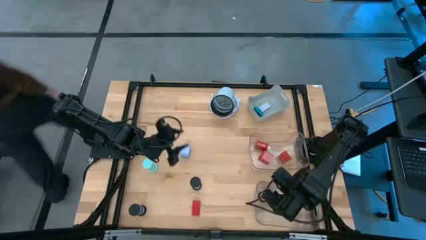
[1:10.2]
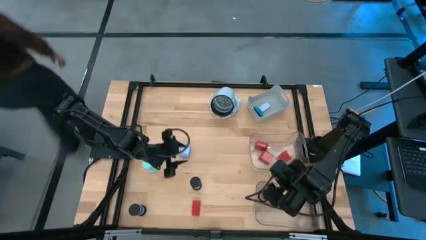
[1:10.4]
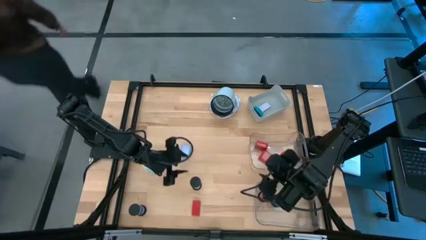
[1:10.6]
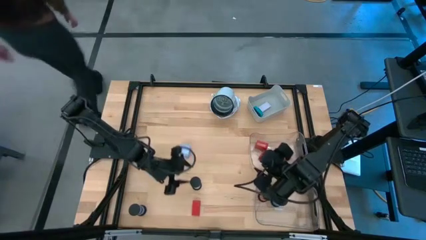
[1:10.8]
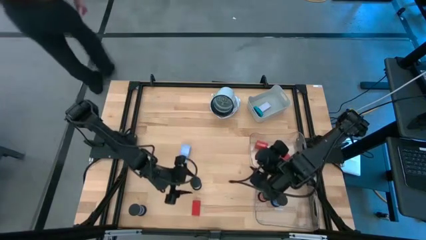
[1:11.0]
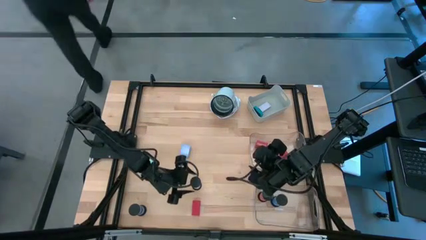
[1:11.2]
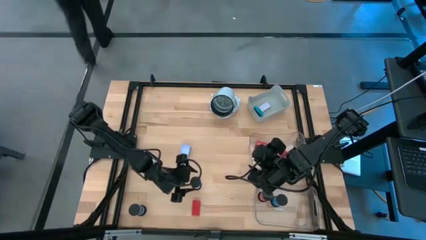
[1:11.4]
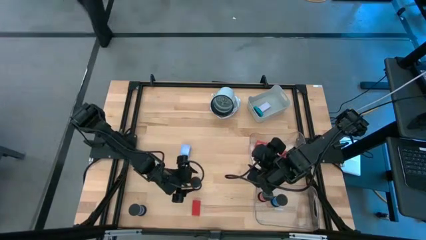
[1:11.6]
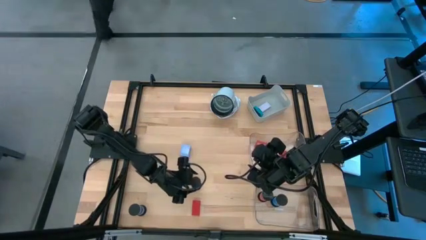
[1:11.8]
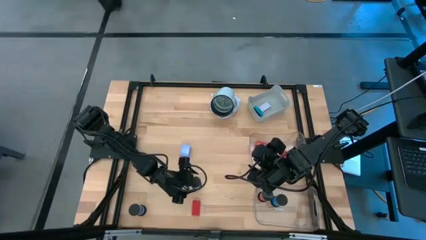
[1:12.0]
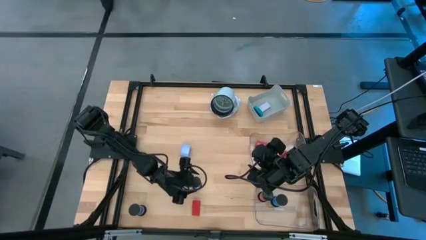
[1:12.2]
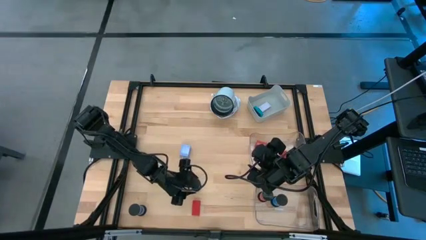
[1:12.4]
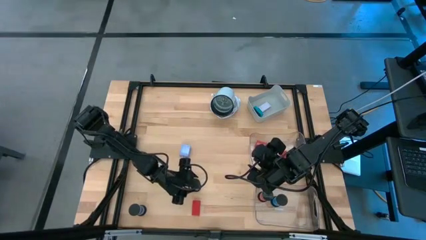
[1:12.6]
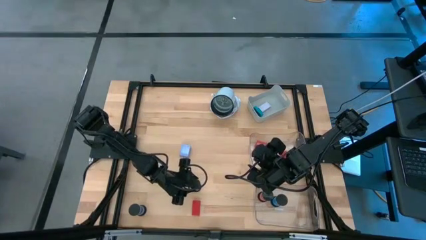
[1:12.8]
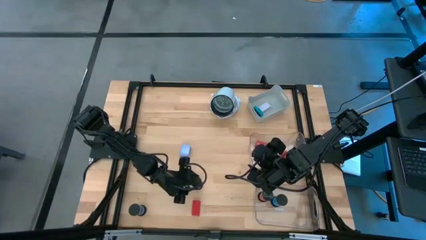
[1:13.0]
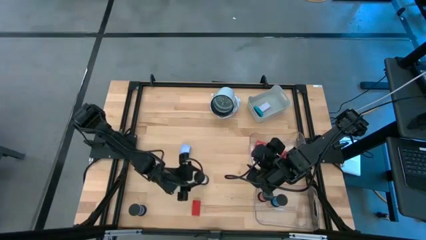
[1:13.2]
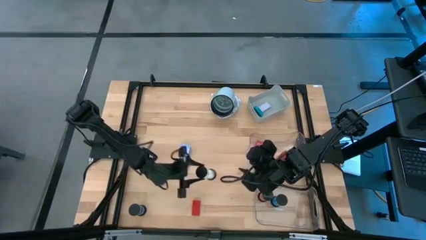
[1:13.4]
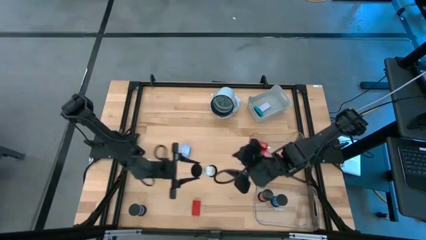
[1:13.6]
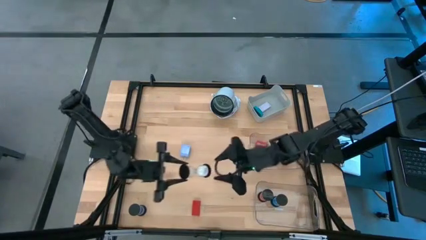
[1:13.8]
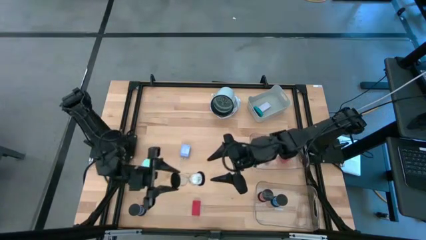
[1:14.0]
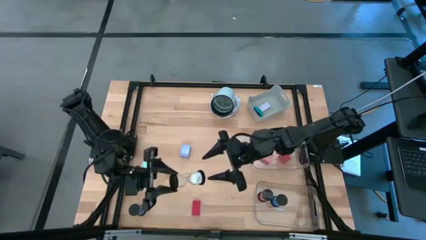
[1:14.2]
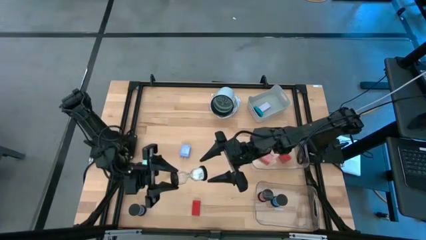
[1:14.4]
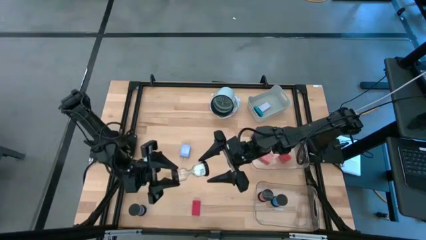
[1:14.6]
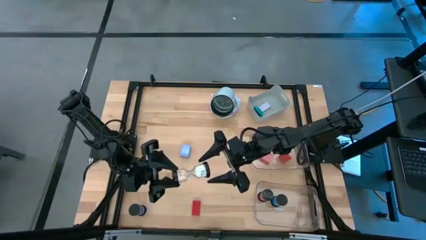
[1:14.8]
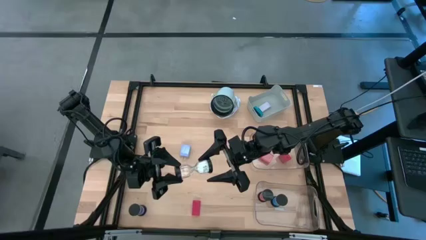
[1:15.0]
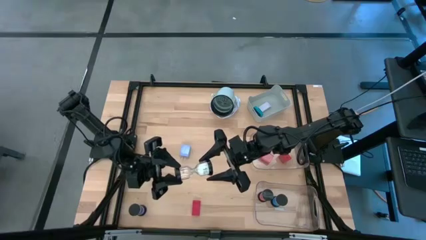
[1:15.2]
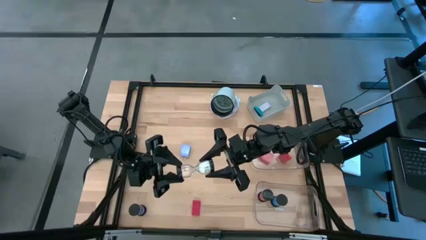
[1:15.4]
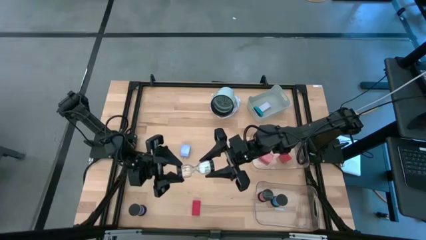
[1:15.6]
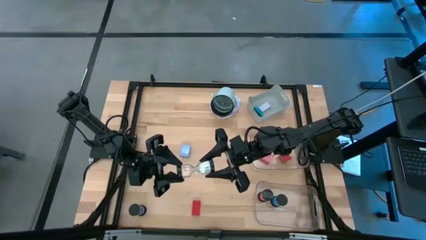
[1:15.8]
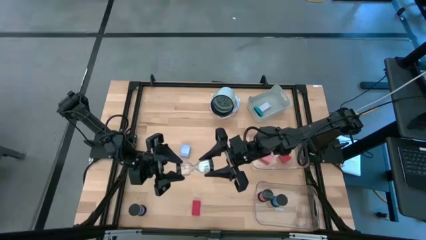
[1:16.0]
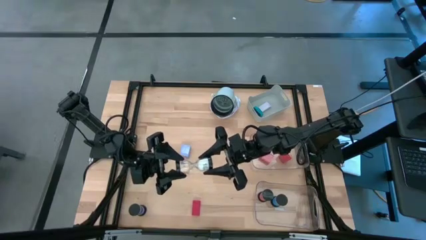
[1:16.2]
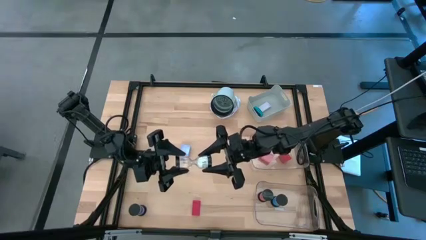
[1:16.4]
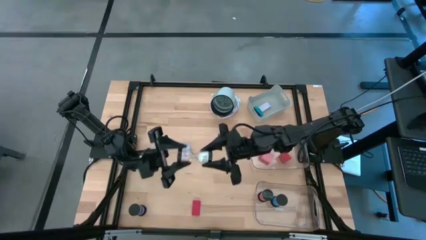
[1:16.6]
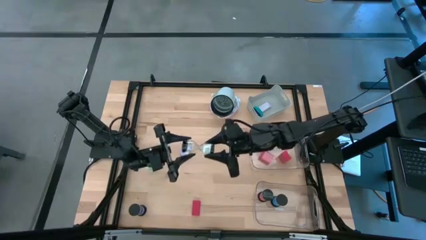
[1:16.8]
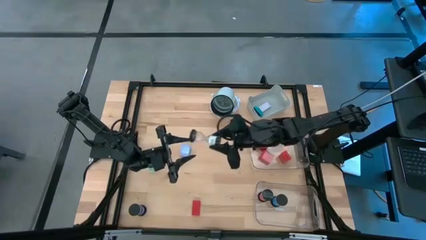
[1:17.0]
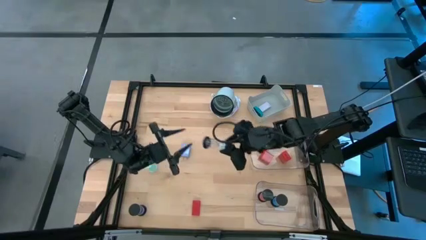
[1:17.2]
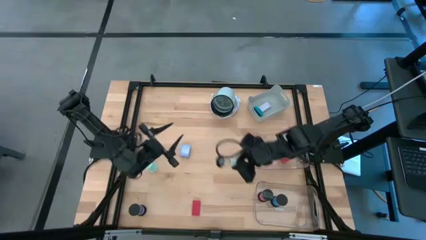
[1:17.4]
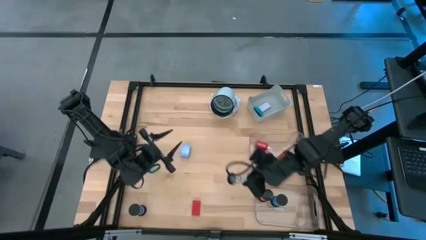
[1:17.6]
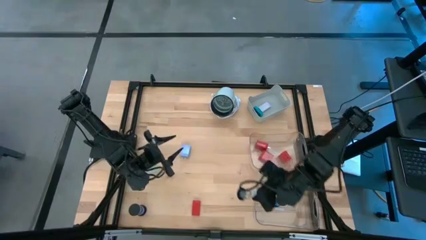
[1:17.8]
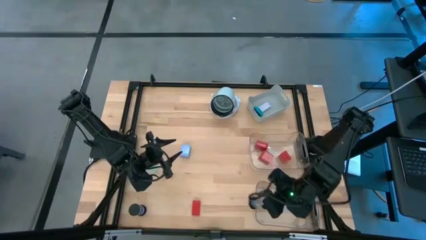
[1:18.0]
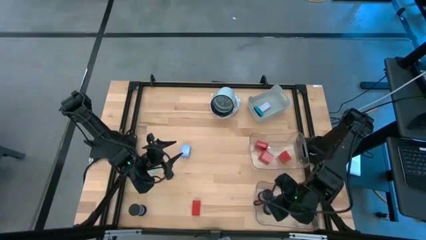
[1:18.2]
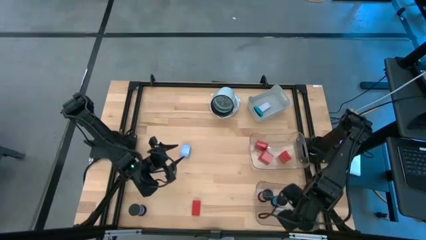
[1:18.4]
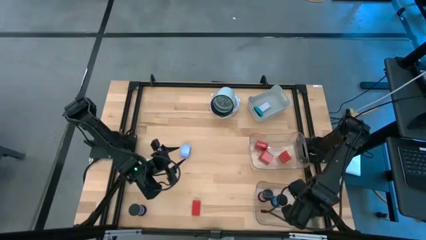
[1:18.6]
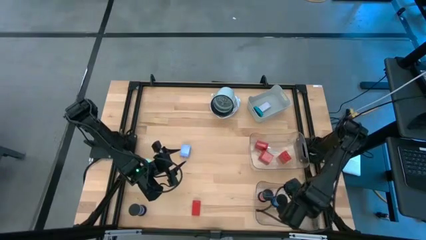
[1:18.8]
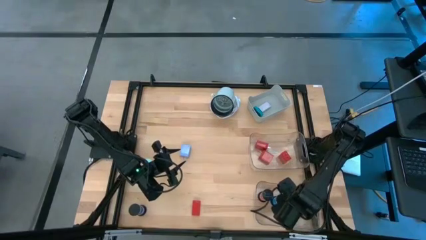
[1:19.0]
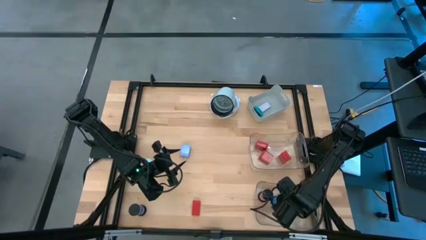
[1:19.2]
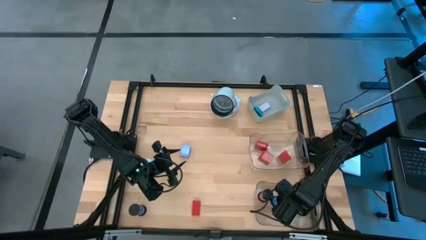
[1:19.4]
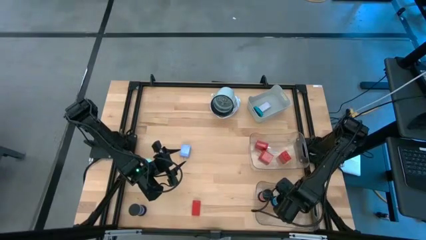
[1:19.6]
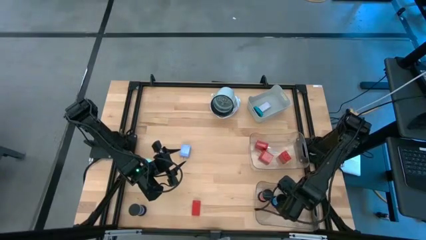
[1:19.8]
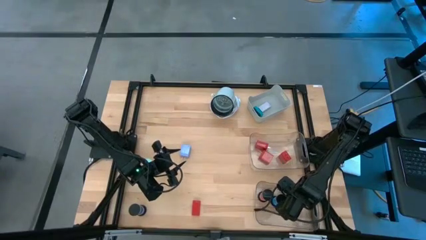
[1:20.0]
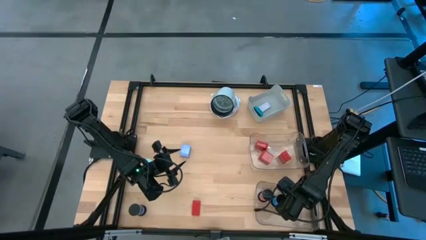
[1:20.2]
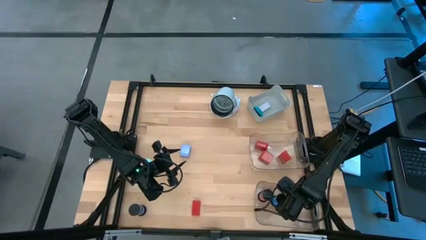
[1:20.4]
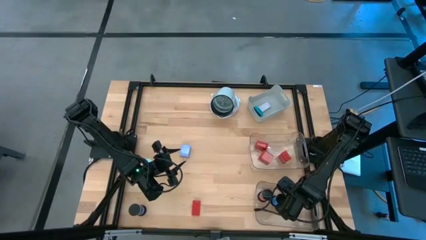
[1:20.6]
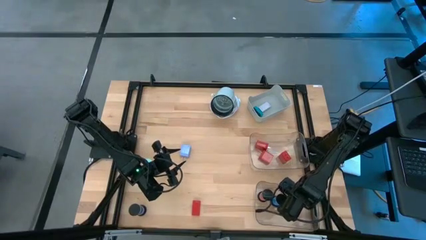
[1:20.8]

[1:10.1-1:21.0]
Task: Pick & Place Office items
Put the white hourglass into the bottom transparent bin
